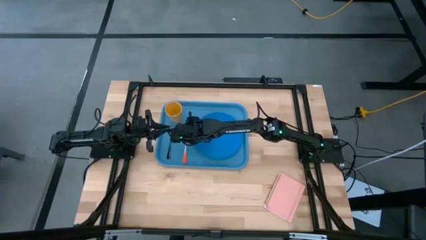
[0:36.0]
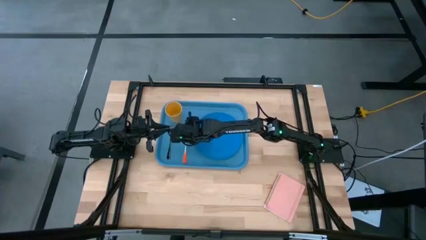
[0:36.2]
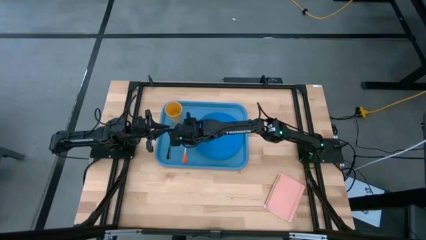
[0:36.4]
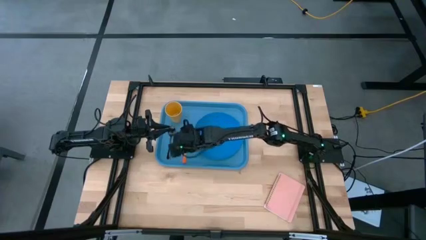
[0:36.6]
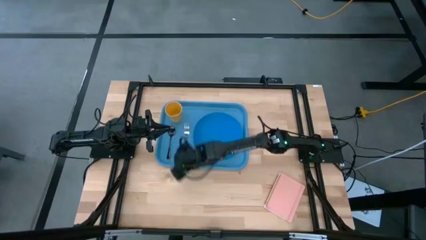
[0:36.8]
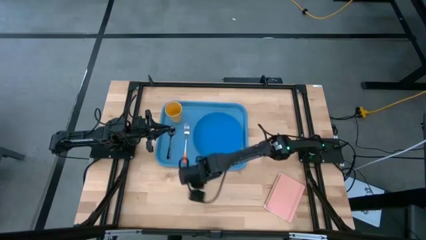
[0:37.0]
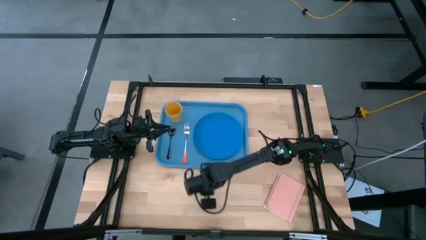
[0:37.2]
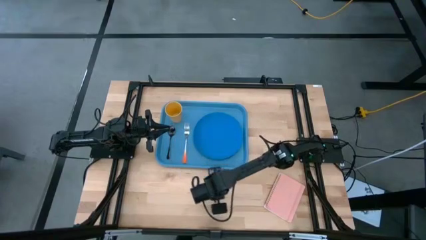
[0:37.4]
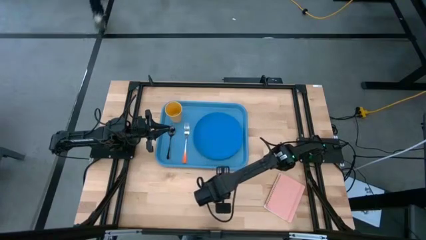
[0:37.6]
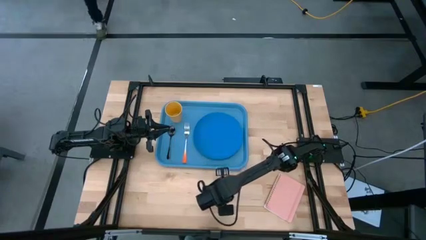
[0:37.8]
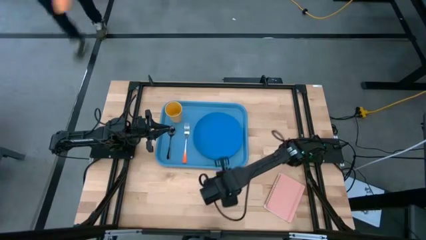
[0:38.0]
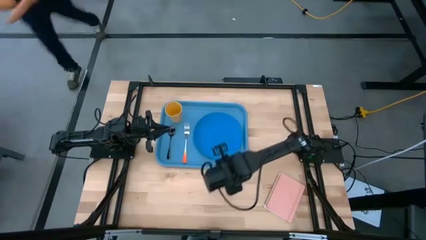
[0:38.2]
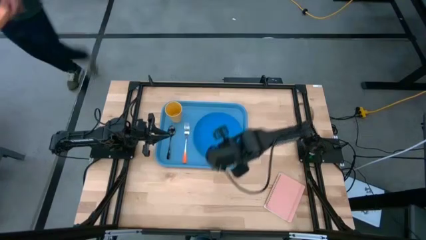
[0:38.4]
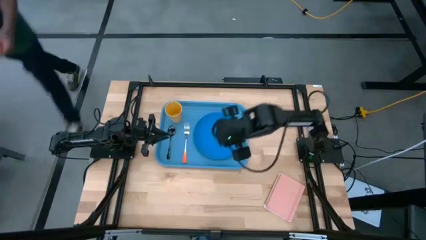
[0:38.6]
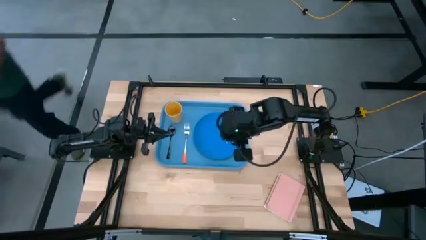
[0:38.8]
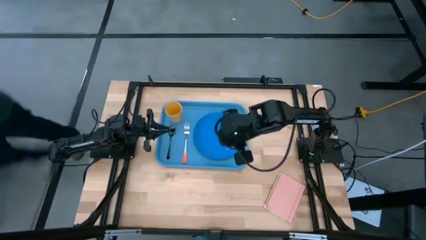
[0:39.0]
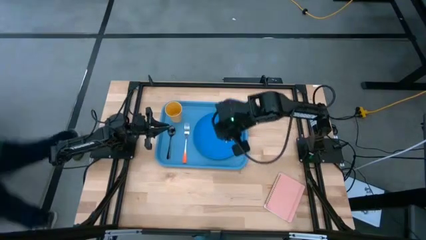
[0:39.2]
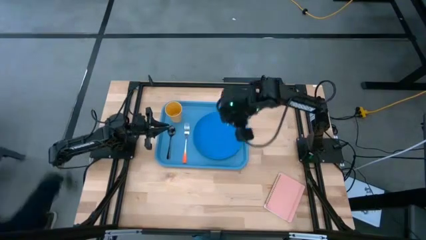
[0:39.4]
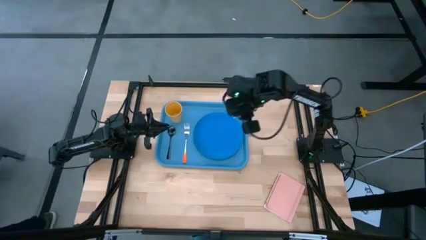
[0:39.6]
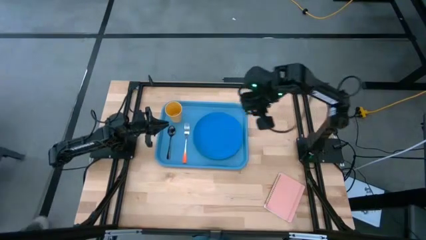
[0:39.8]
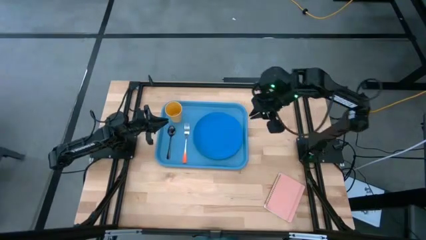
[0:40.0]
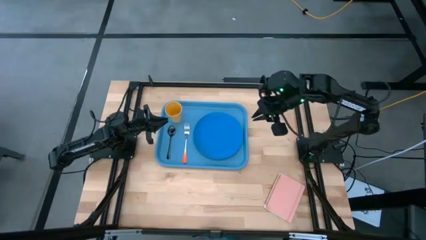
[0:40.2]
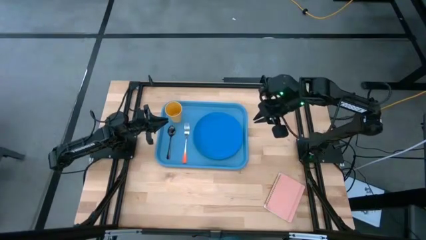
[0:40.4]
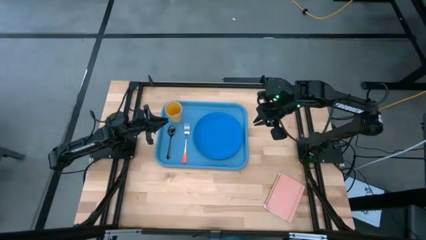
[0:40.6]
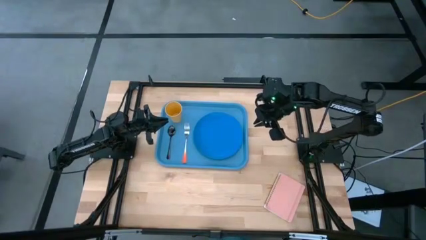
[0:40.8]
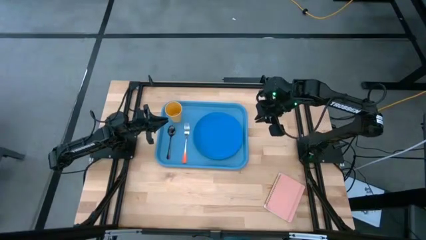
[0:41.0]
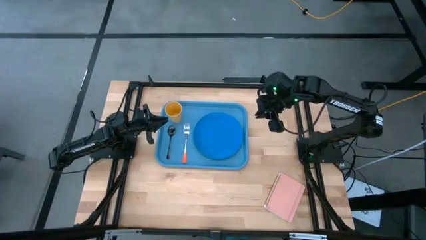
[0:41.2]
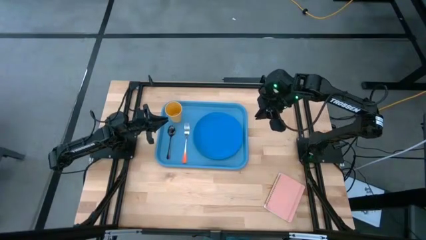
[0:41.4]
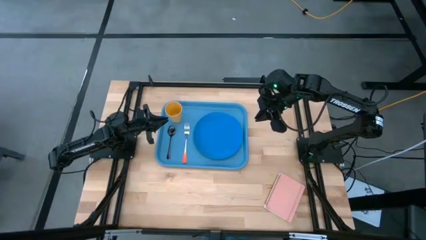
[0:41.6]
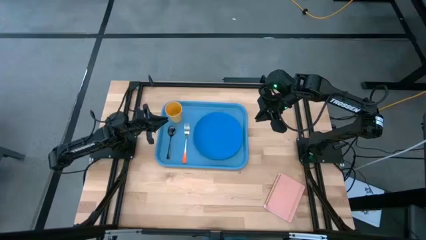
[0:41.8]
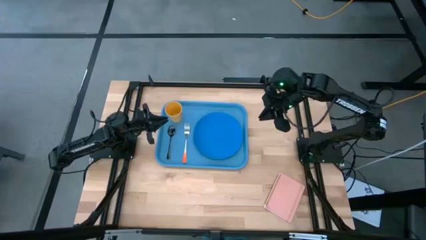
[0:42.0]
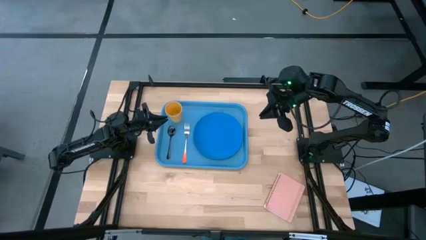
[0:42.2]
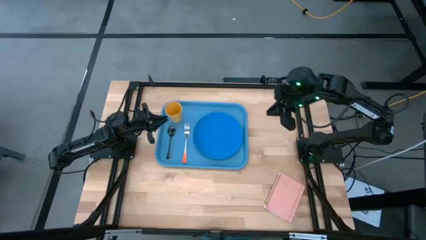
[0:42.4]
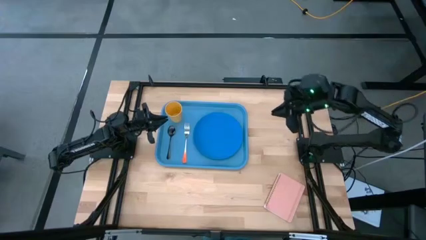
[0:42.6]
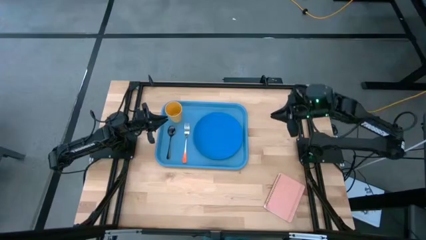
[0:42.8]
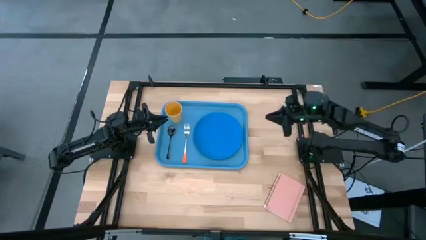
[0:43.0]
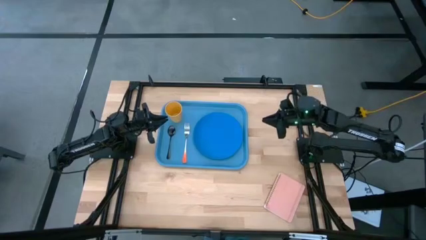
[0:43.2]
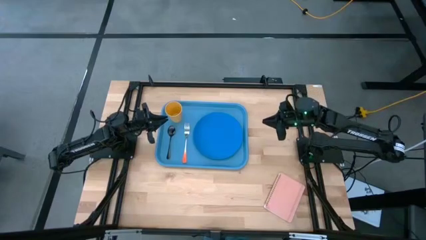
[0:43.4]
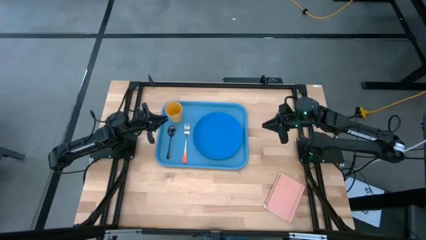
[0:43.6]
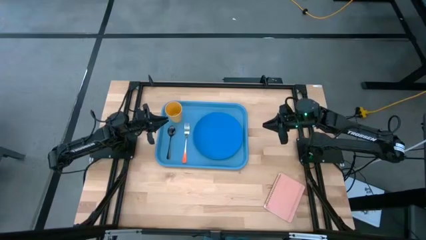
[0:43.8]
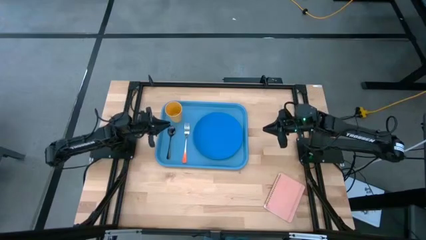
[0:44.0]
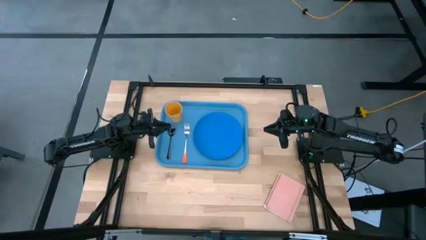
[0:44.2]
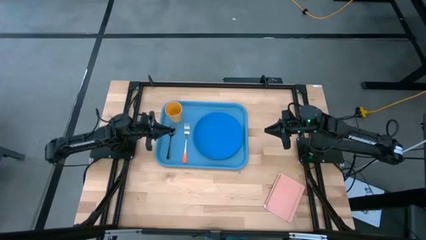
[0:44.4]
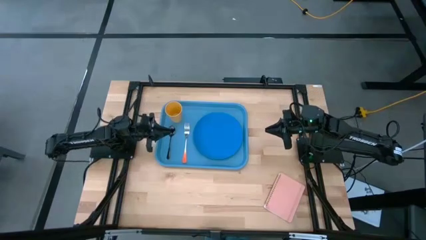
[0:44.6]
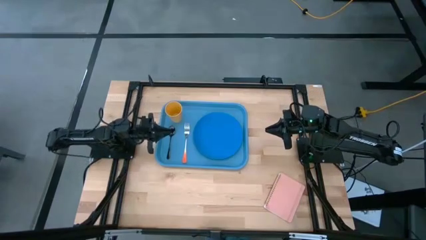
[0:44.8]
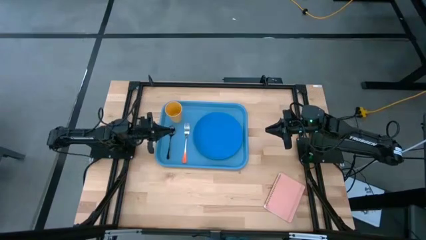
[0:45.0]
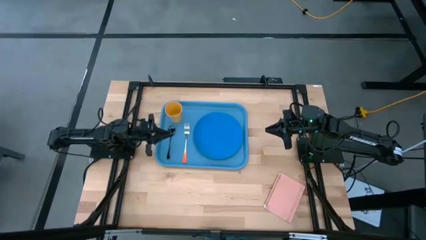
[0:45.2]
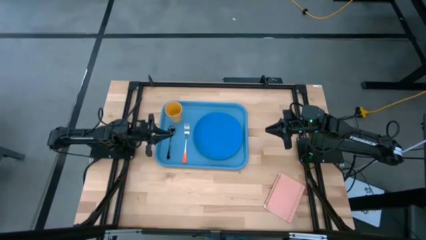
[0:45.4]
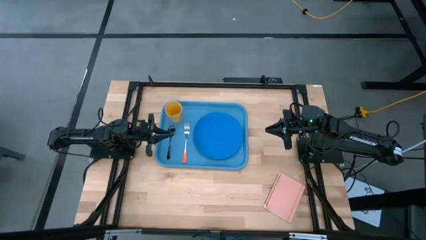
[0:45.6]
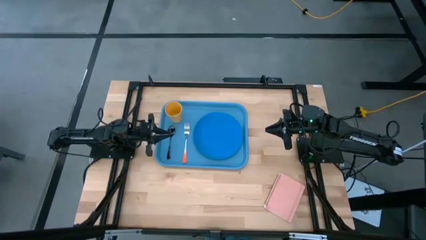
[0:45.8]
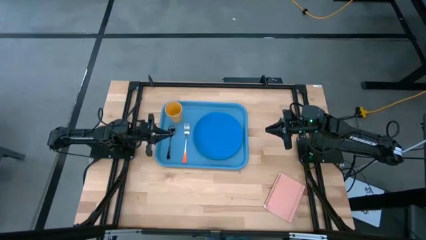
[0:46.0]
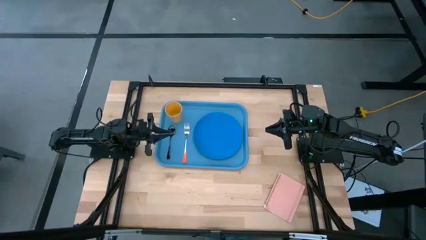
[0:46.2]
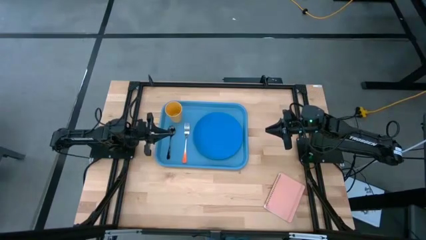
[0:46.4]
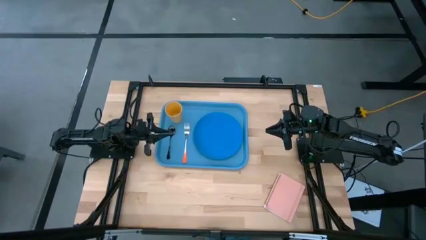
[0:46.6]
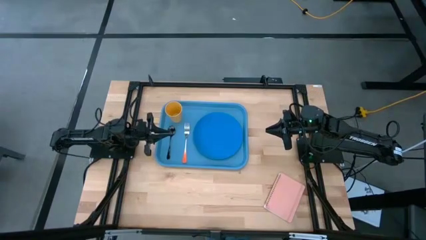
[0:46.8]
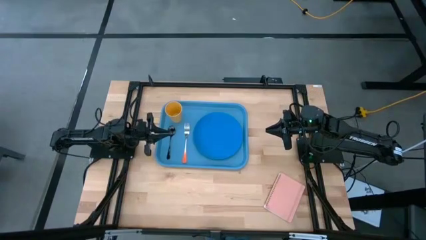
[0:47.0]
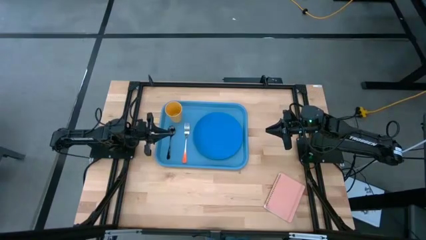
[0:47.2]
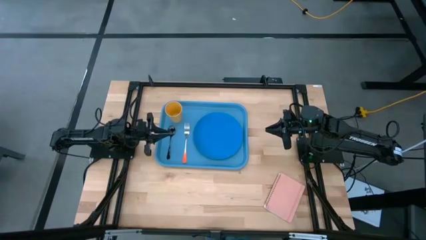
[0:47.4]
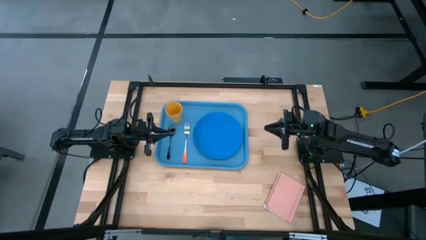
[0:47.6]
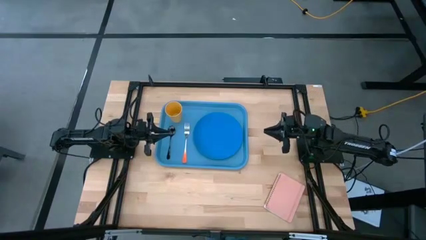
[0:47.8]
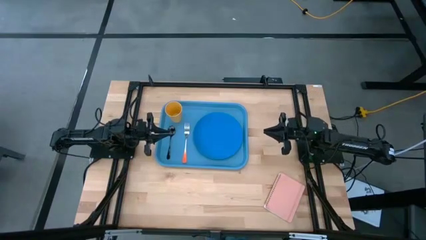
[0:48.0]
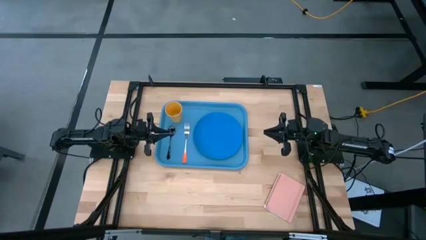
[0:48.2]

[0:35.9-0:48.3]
Task: Pick and place plate/cup/fork/spoon on tray
Return to Home Position
